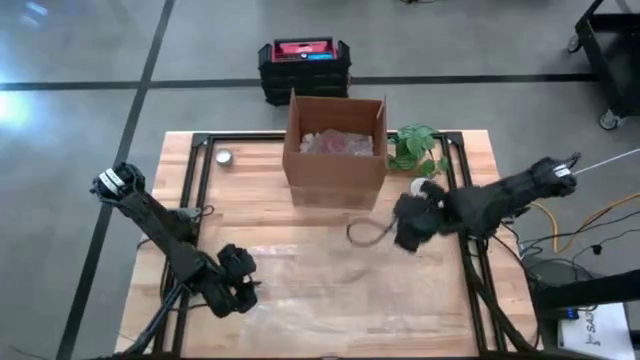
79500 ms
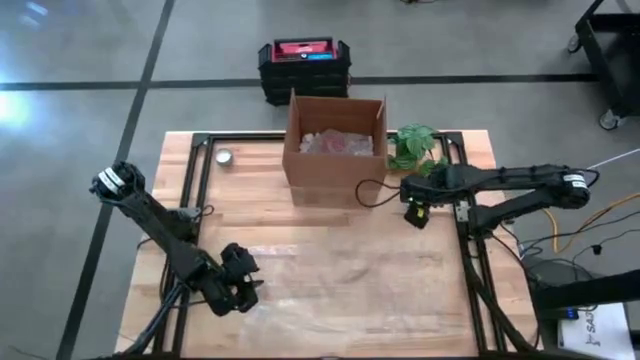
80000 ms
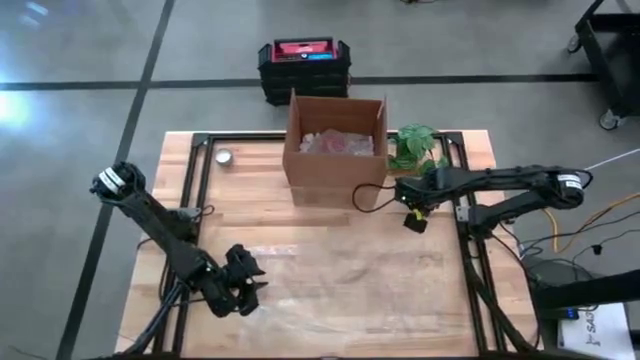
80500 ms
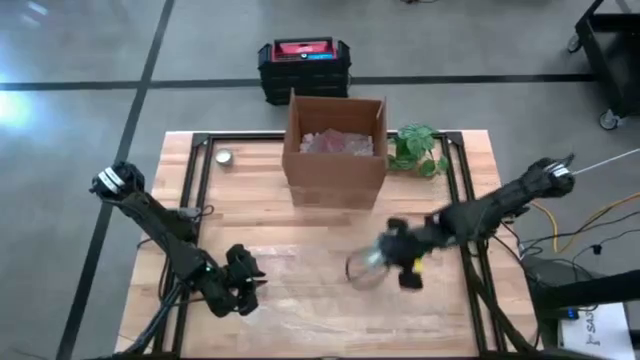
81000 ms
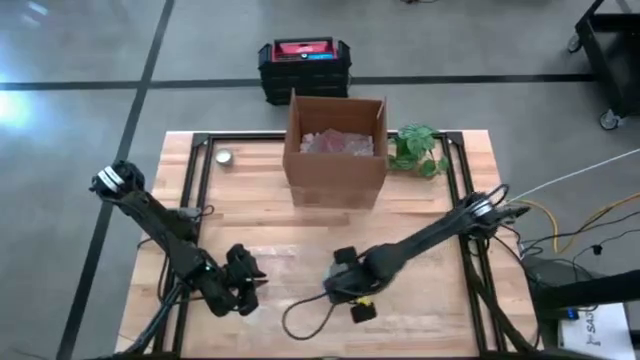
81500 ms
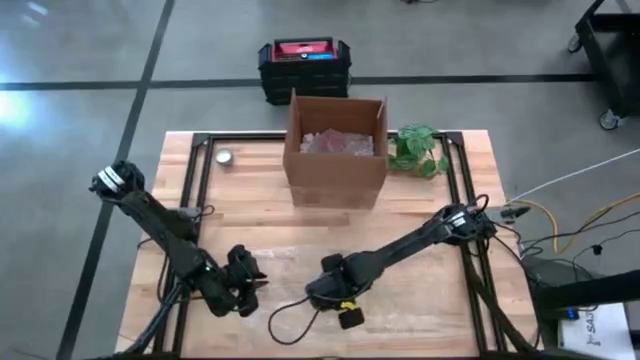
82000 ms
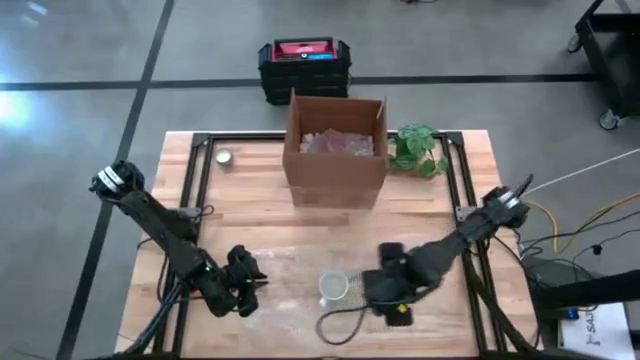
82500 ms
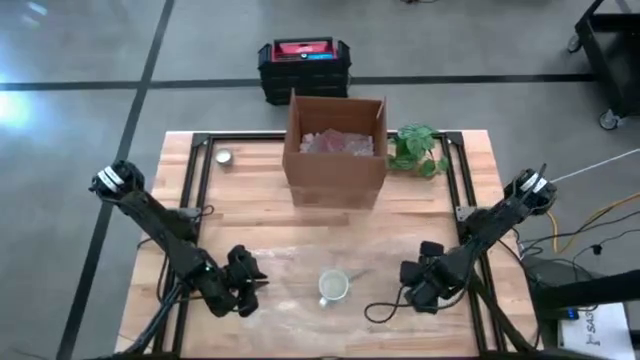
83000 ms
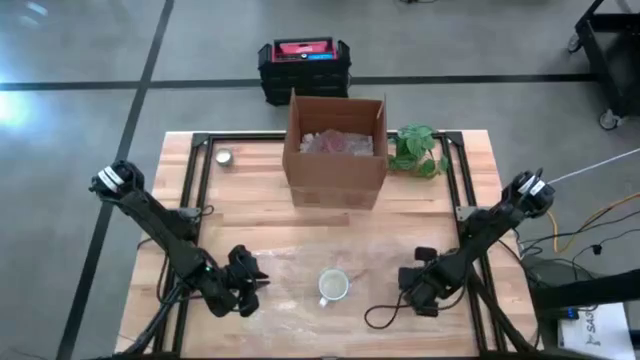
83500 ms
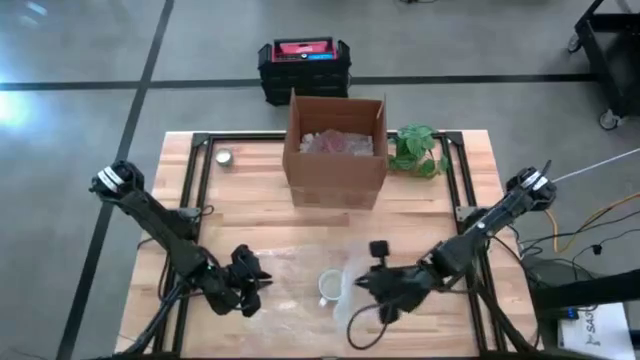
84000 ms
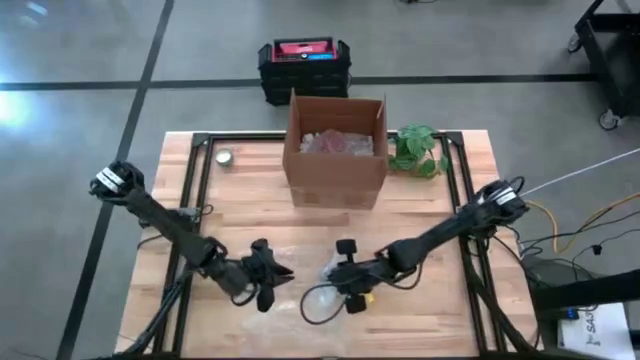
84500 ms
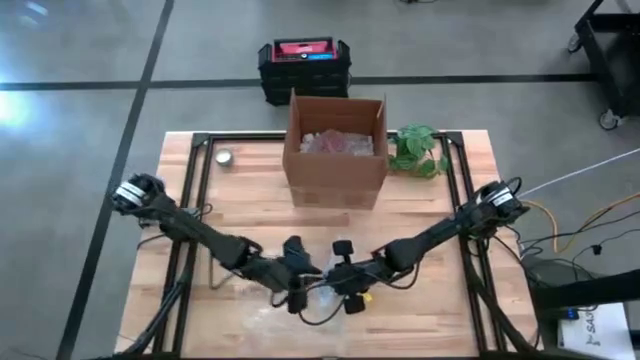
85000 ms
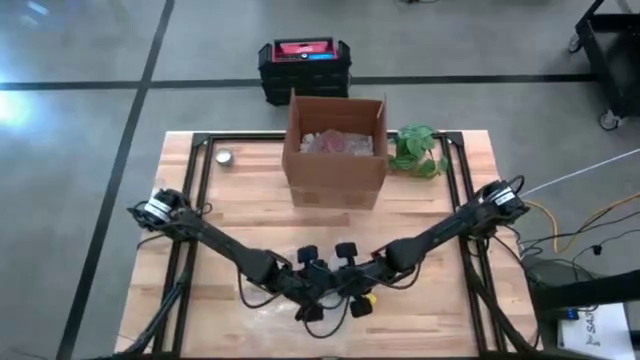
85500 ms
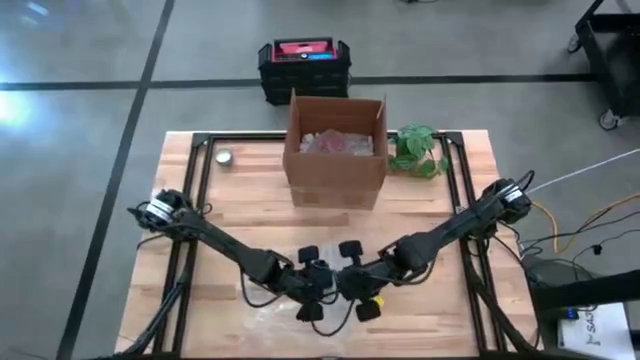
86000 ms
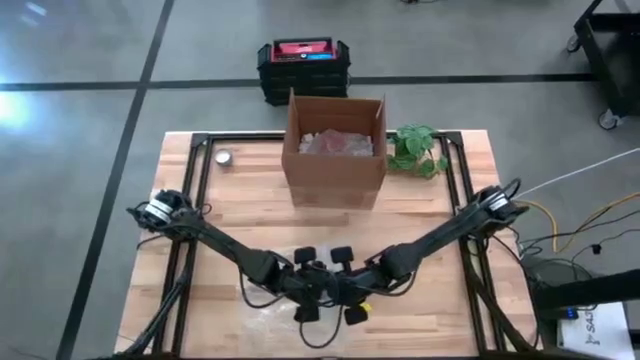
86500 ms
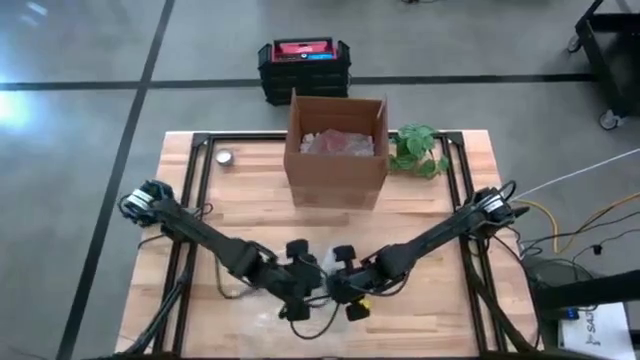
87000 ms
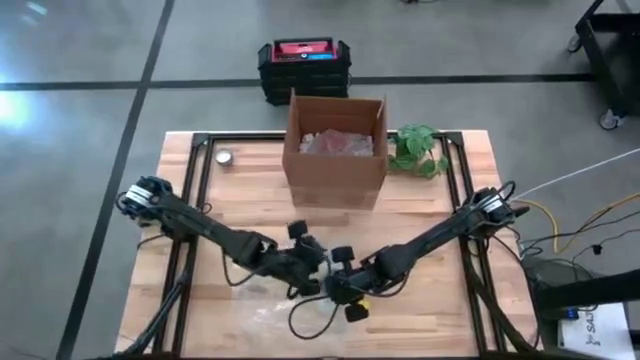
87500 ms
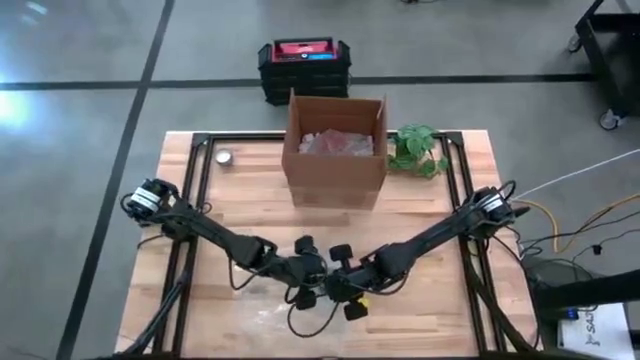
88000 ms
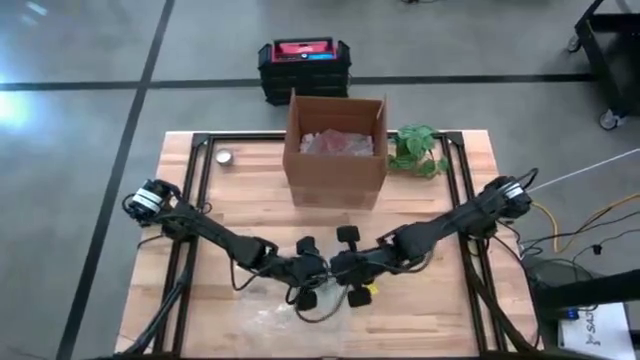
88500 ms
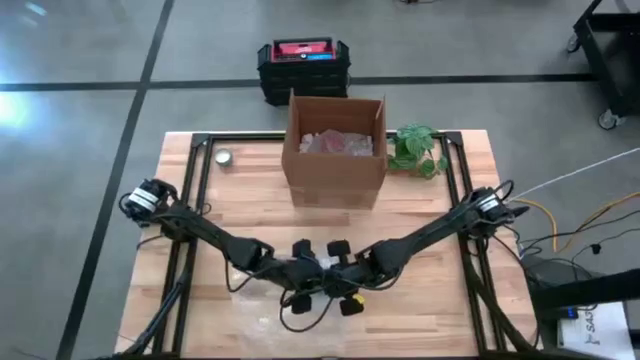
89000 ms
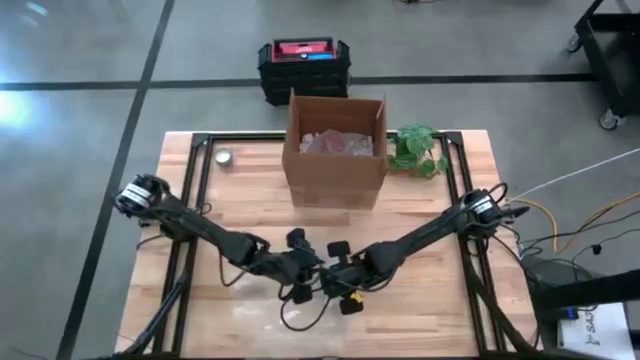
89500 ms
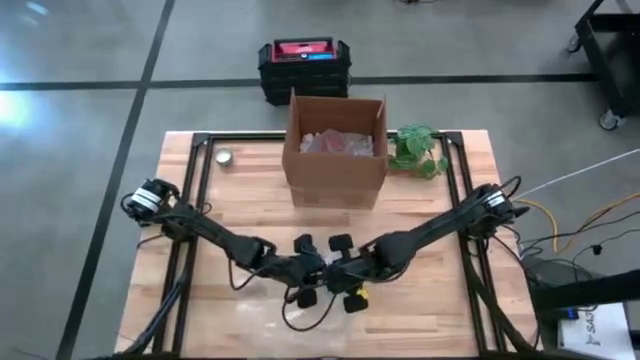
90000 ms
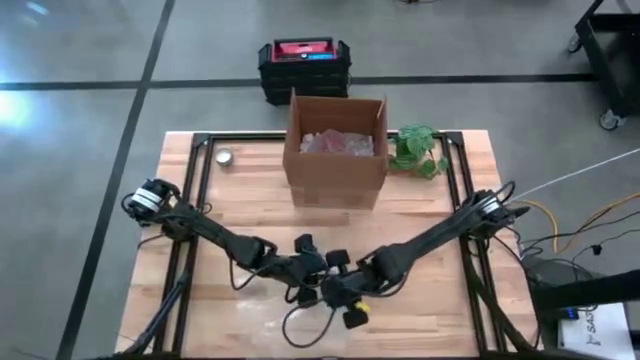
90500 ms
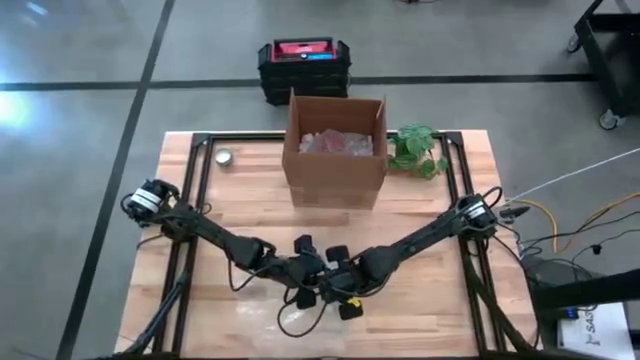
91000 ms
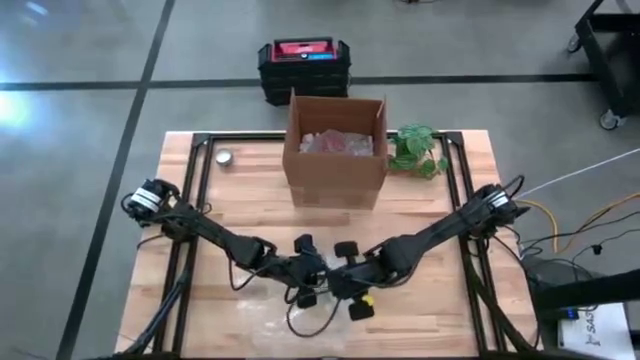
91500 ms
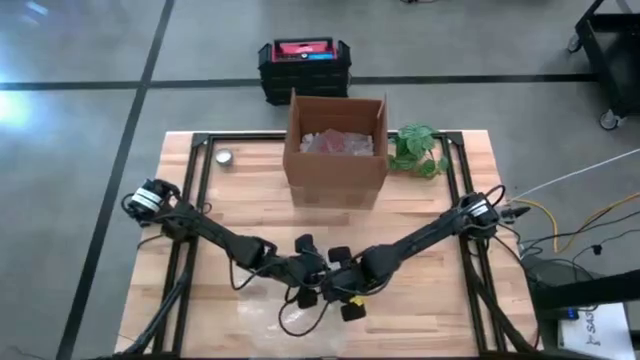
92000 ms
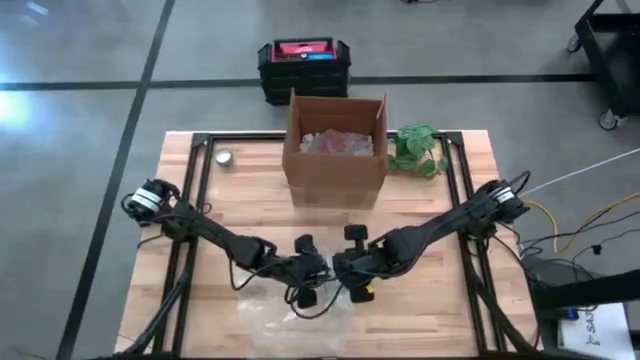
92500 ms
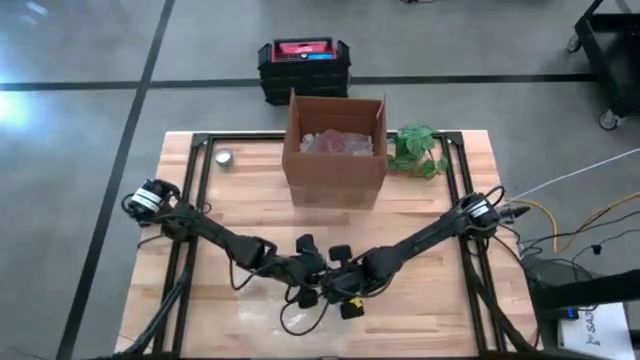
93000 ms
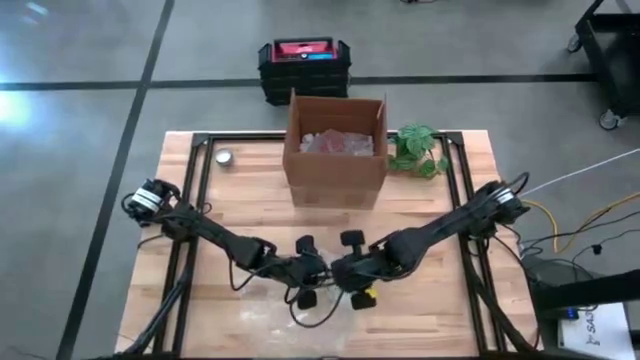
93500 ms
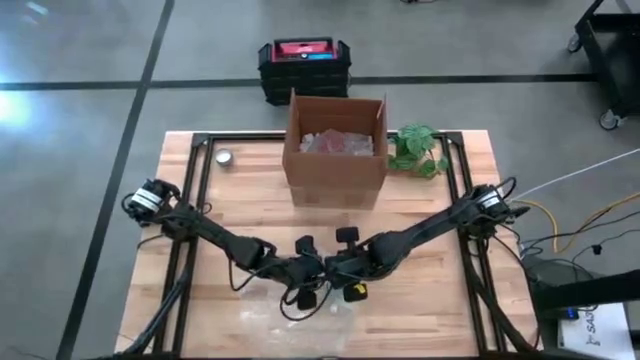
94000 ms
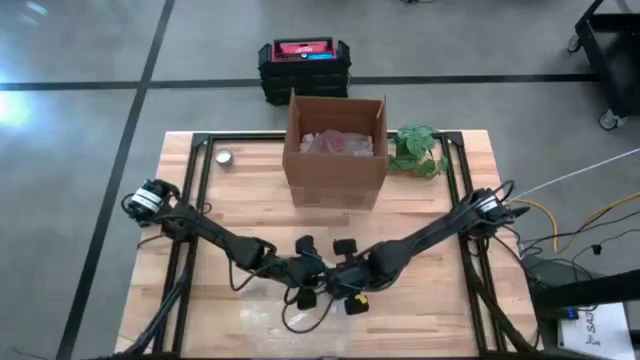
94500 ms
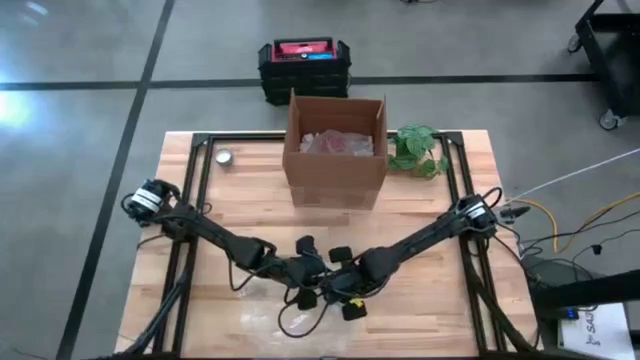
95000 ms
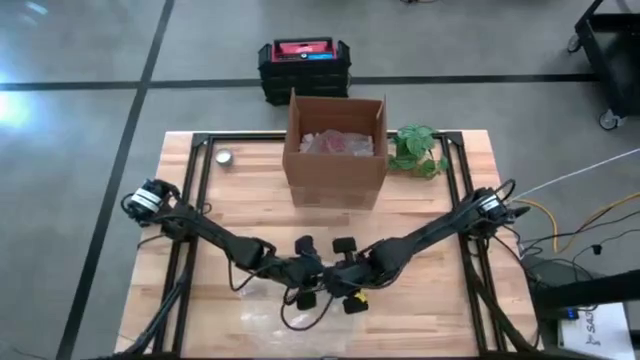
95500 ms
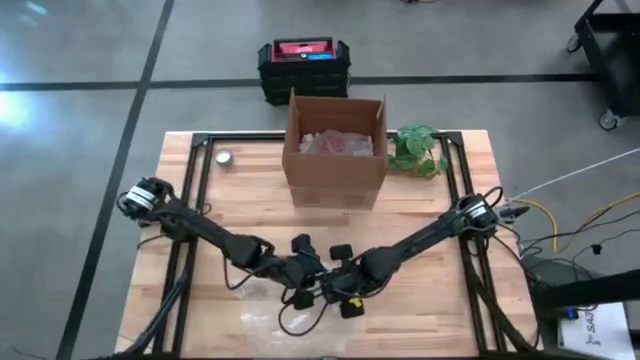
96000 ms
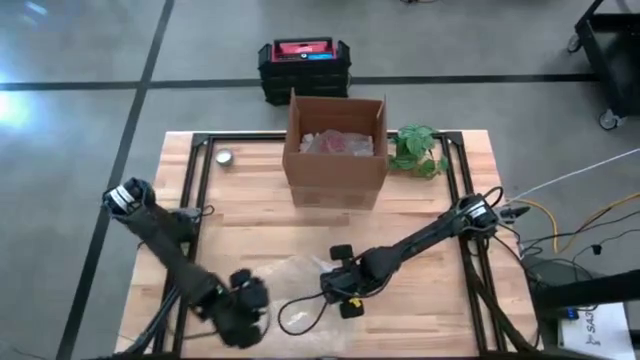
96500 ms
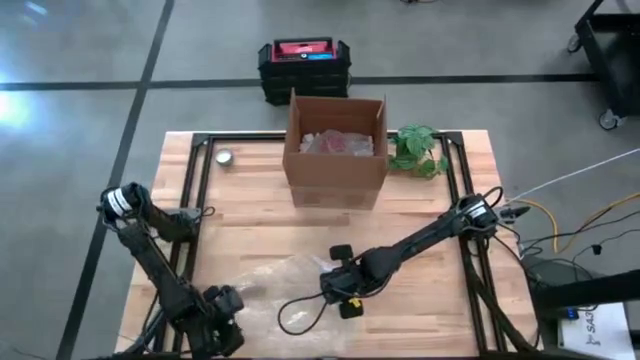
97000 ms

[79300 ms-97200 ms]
Task: wrap mug
Wrap the white mug with the transparent bubble wrap
